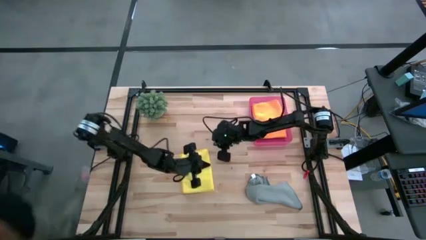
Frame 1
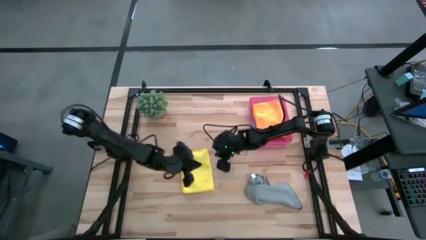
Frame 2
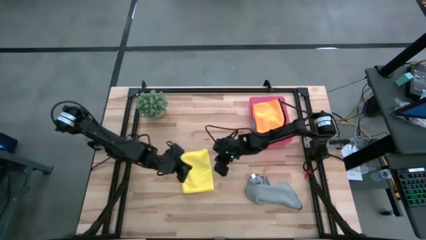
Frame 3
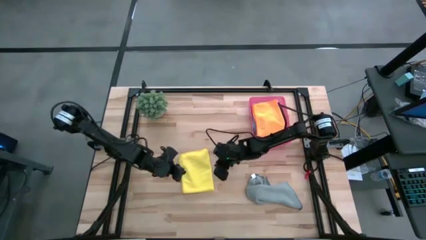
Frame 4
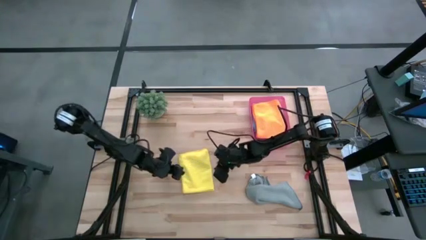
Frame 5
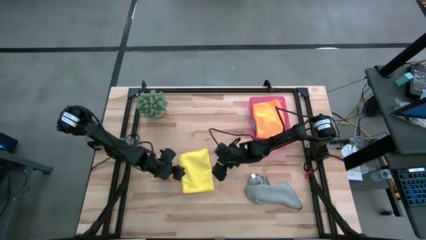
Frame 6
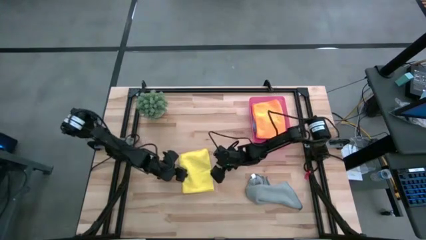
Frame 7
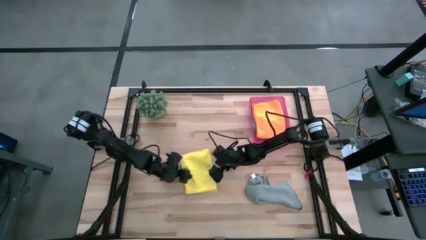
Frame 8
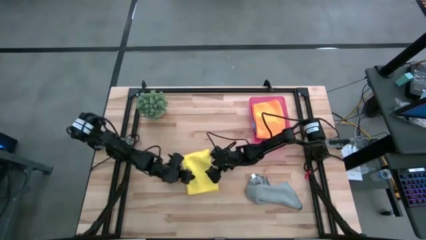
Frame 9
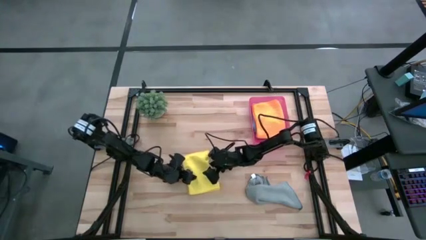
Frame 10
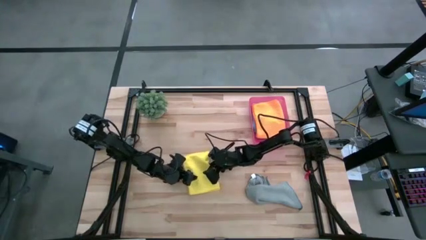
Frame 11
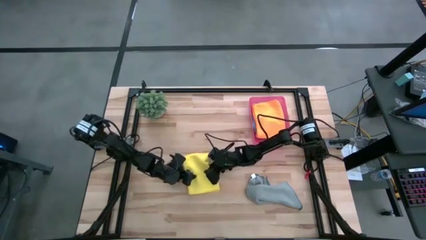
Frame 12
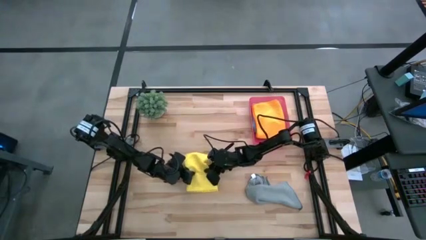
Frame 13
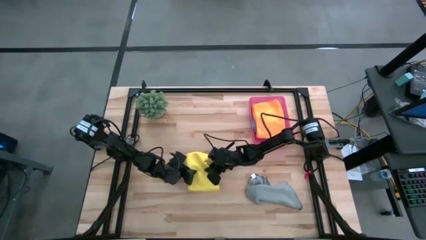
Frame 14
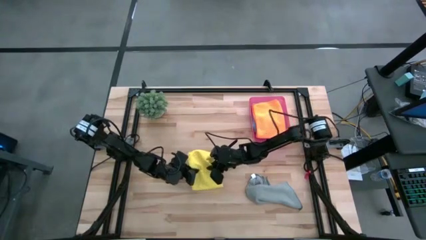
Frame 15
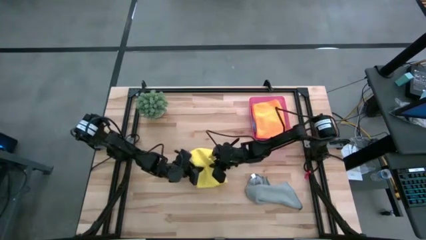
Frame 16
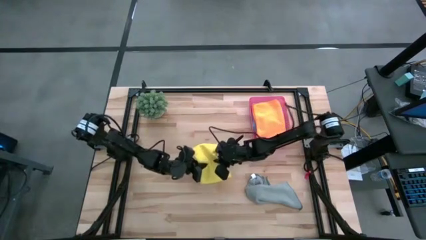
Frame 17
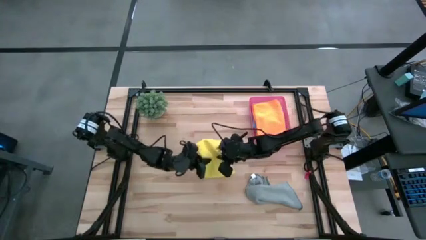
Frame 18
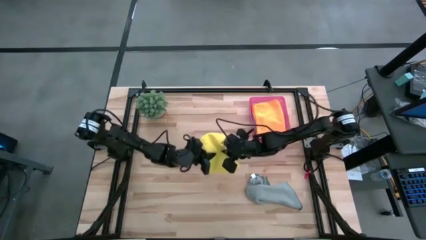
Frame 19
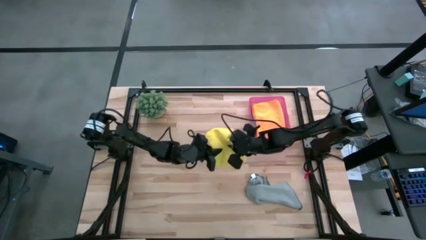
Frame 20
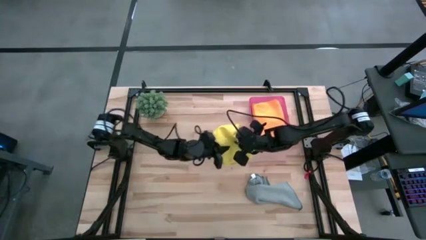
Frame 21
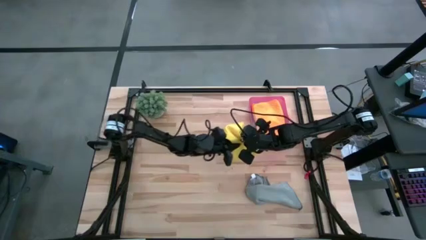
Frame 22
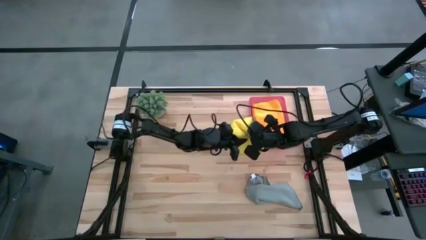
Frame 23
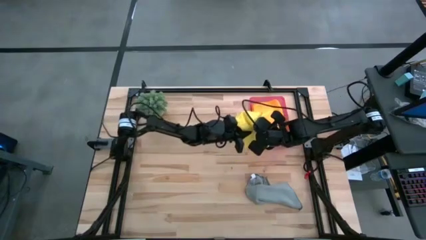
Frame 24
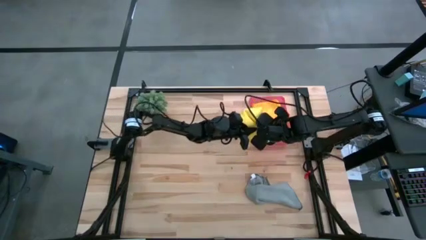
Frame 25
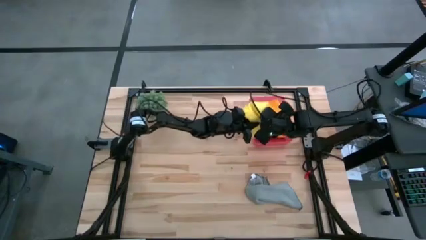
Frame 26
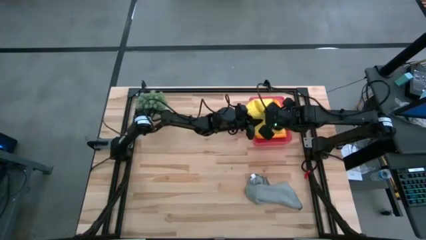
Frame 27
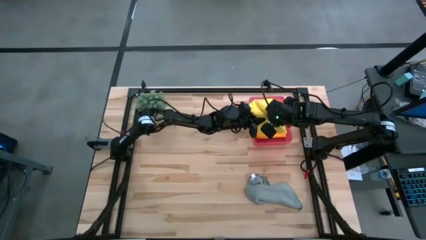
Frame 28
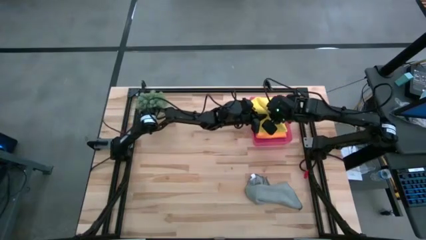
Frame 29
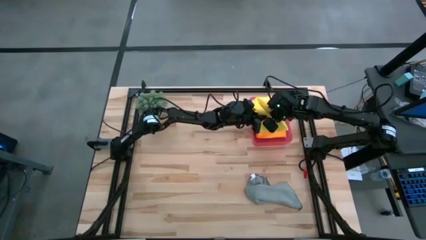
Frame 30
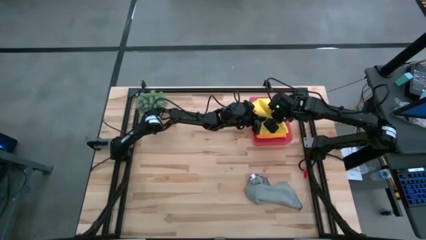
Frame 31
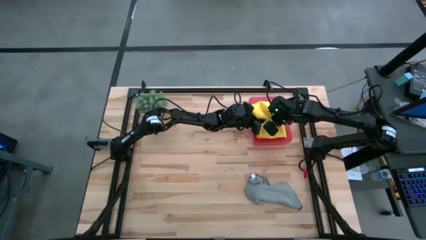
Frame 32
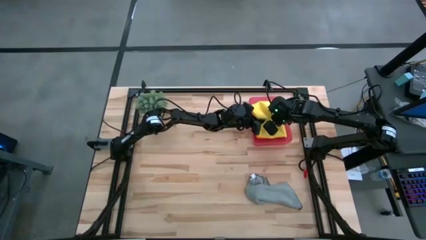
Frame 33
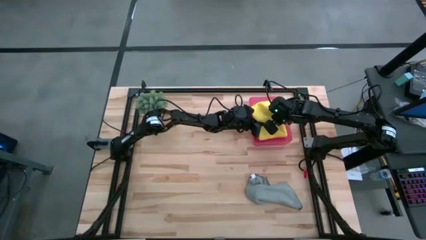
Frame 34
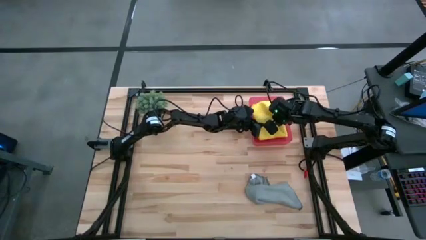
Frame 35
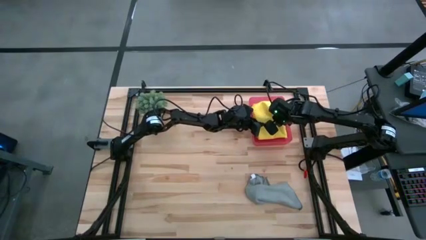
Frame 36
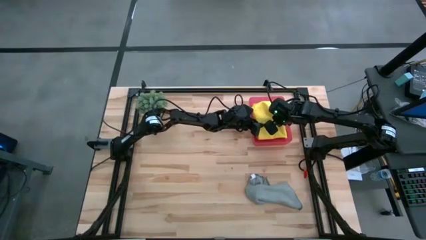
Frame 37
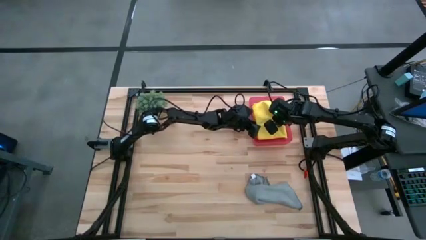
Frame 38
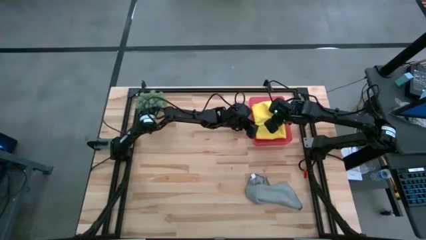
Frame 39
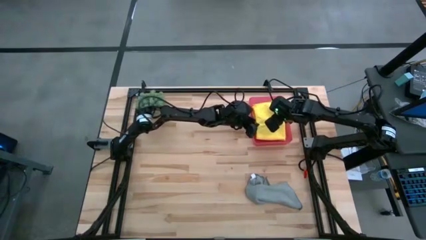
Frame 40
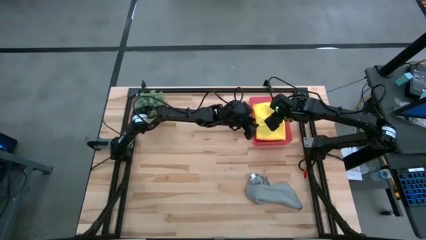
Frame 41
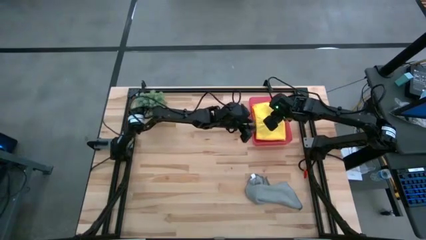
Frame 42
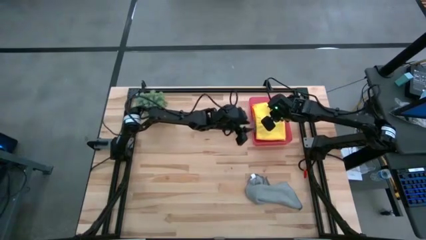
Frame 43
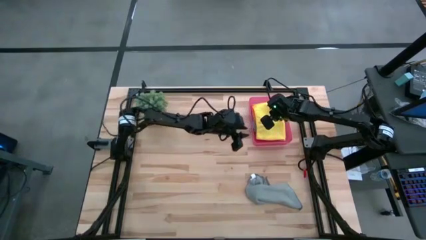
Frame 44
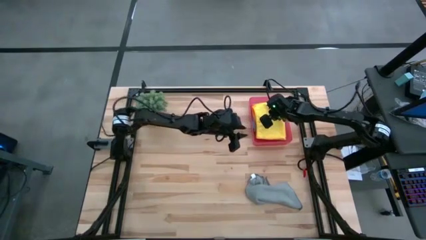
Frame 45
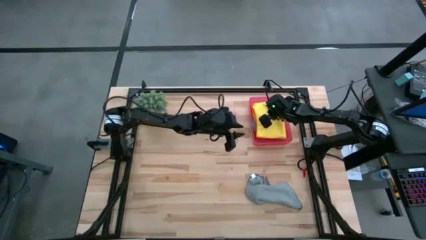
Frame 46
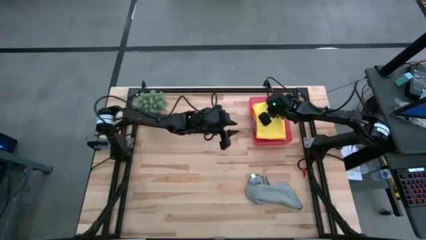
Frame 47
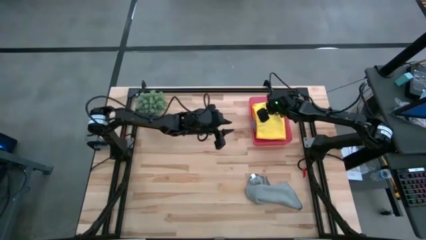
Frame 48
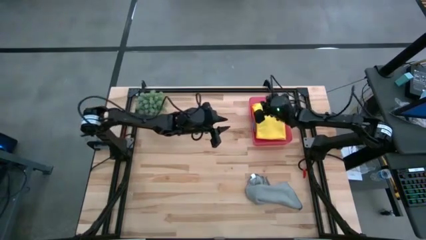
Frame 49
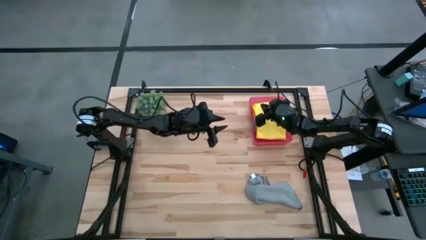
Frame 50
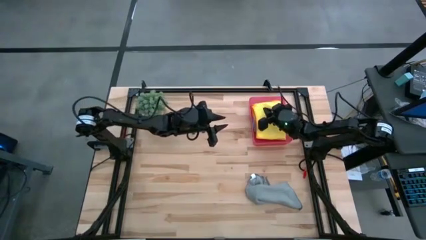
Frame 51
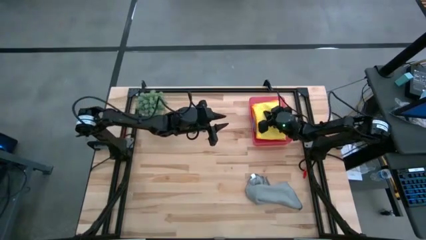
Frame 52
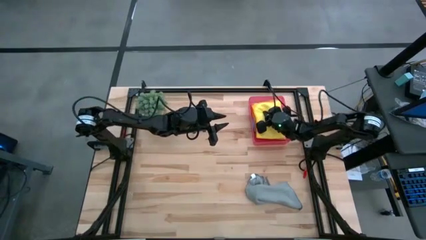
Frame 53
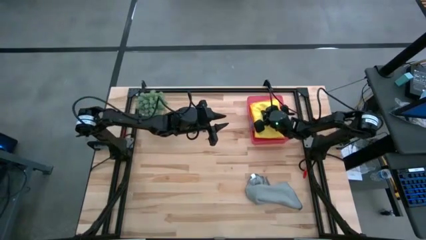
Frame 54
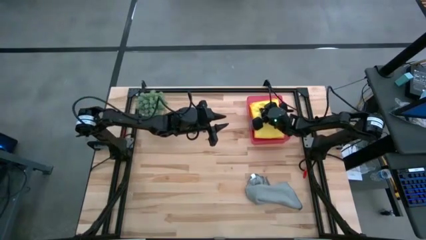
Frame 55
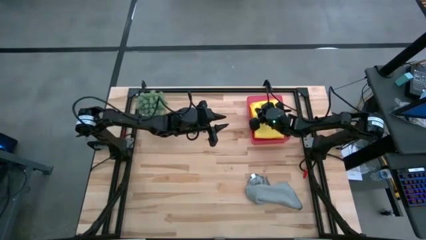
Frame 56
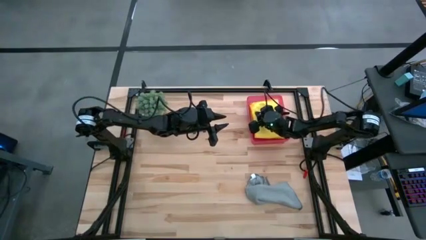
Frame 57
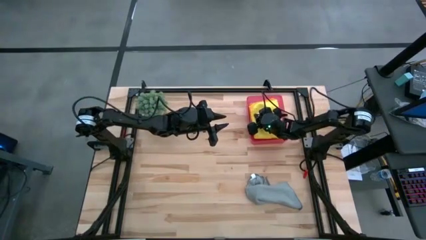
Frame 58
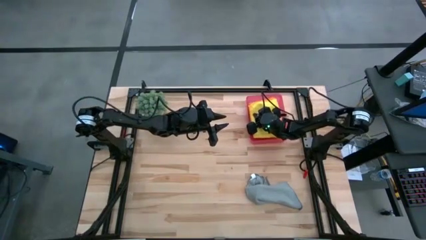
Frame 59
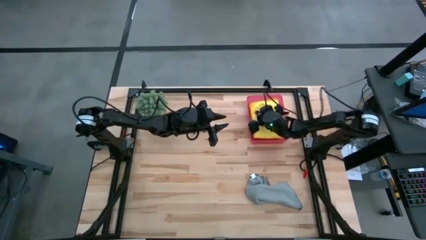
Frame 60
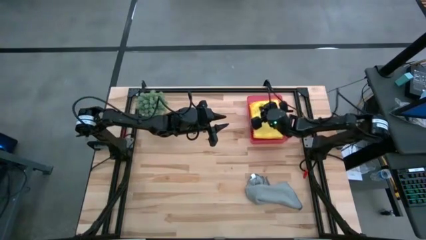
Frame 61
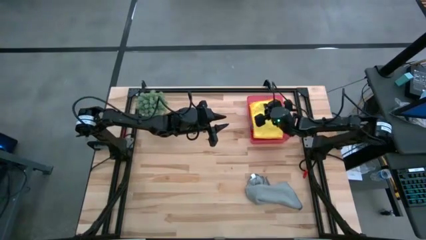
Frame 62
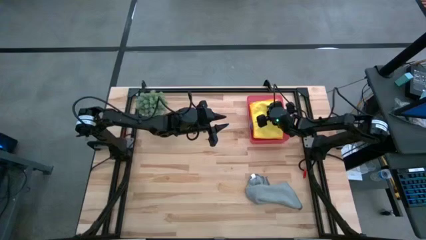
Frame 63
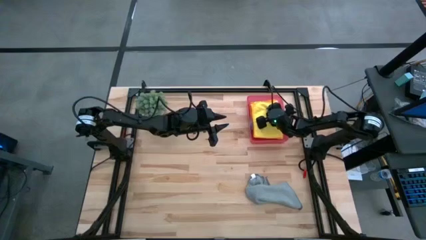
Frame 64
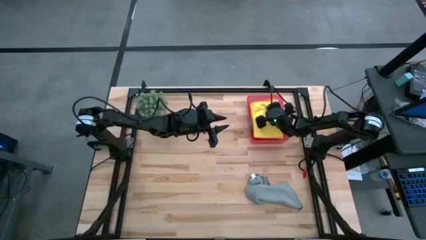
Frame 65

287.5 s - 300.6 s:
Task: Fold microfiber towels
Put the yellow microfiber cloth into the pink bin
